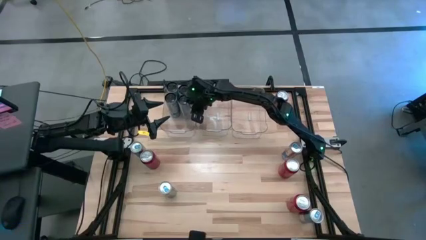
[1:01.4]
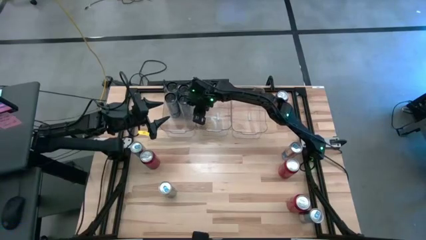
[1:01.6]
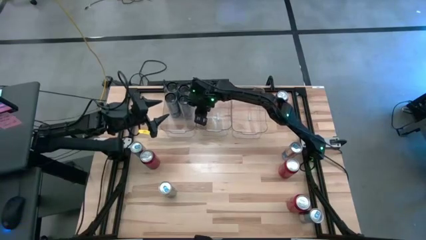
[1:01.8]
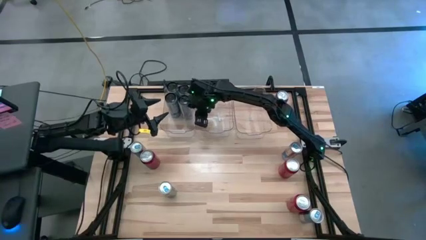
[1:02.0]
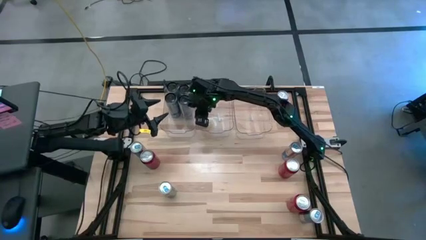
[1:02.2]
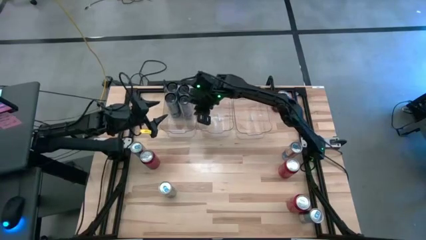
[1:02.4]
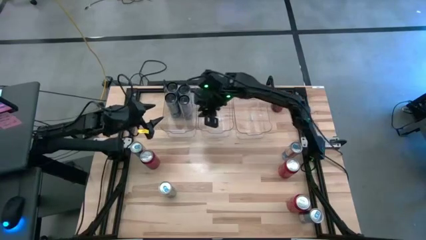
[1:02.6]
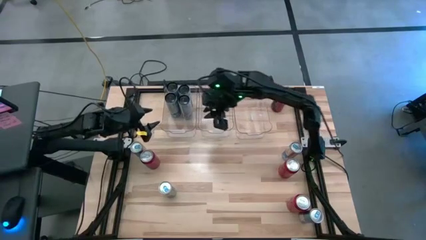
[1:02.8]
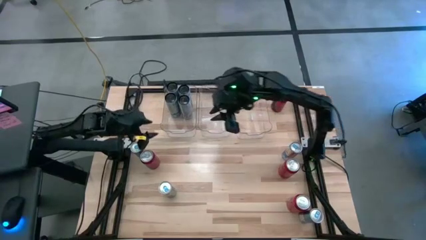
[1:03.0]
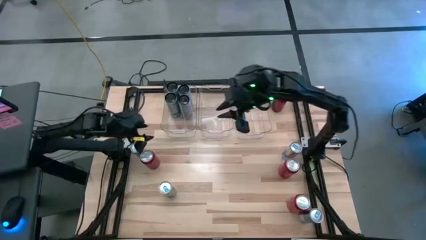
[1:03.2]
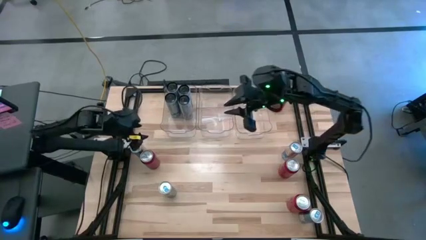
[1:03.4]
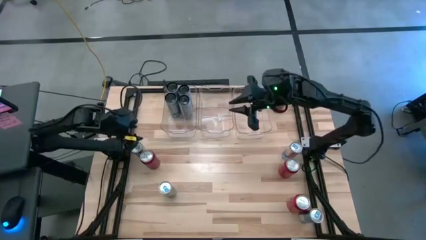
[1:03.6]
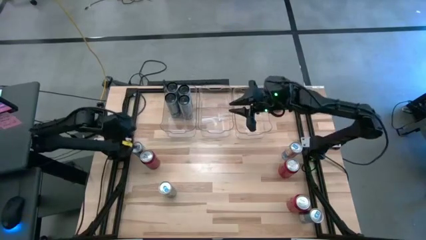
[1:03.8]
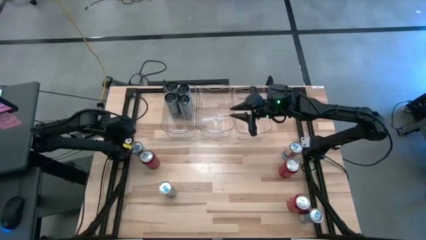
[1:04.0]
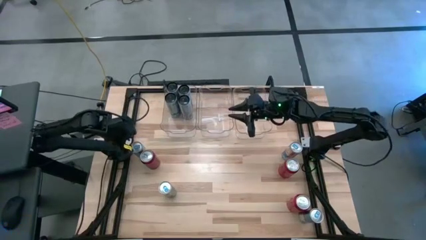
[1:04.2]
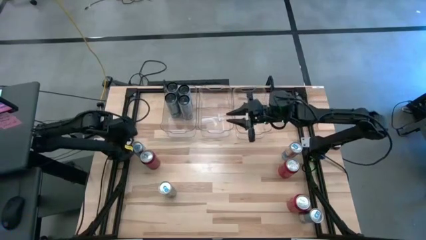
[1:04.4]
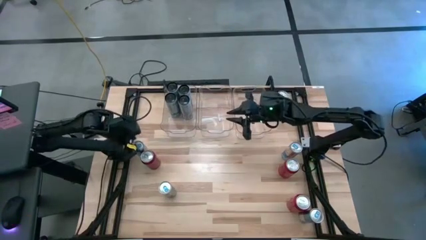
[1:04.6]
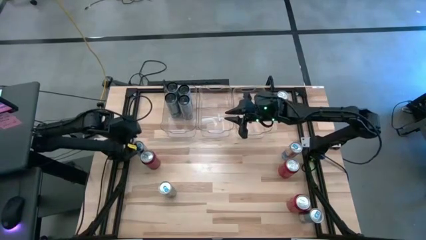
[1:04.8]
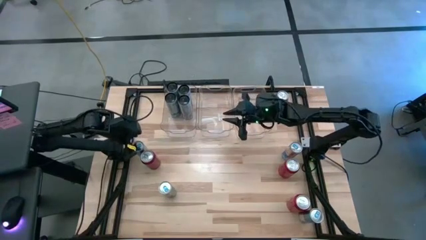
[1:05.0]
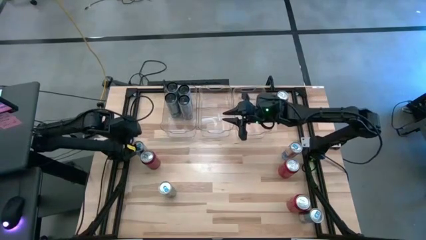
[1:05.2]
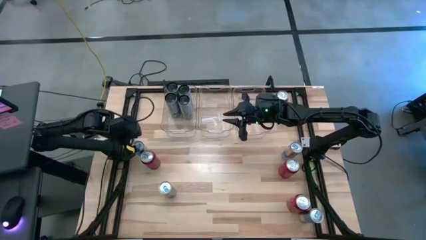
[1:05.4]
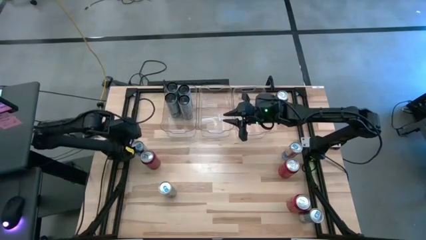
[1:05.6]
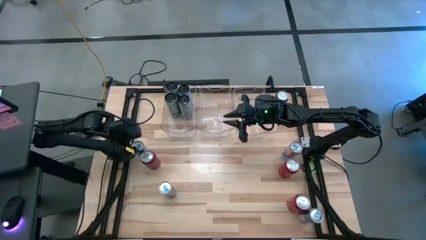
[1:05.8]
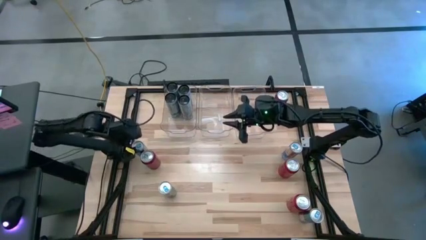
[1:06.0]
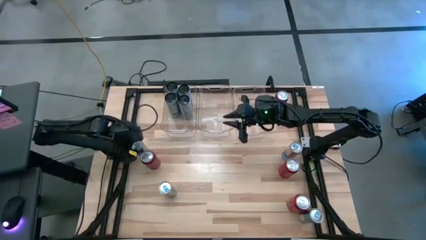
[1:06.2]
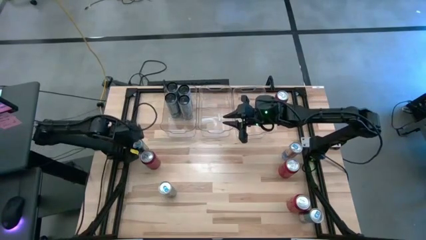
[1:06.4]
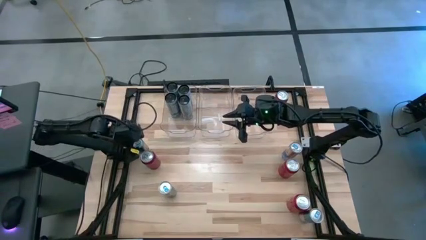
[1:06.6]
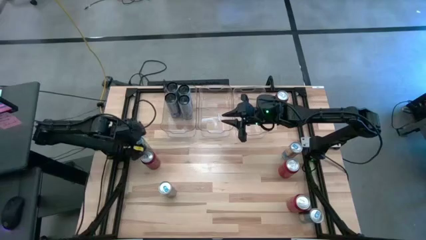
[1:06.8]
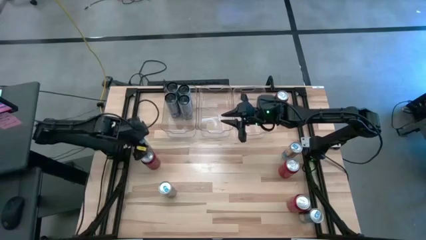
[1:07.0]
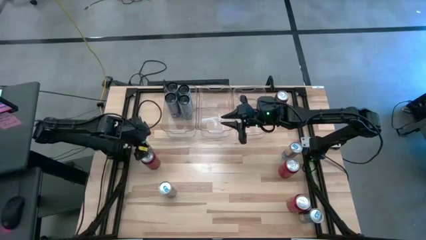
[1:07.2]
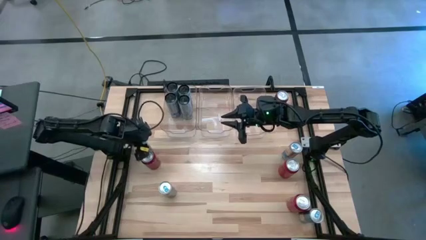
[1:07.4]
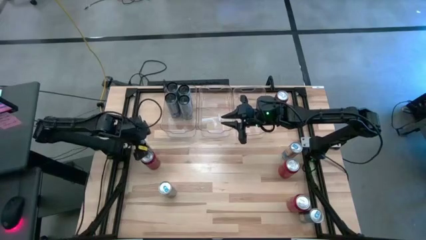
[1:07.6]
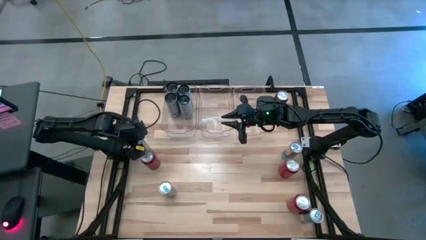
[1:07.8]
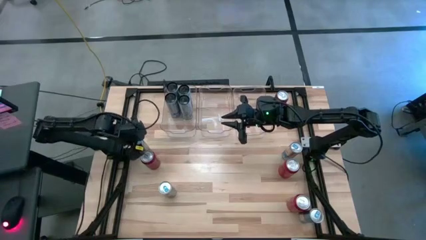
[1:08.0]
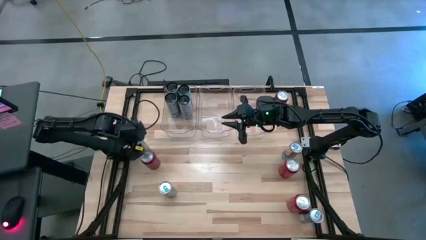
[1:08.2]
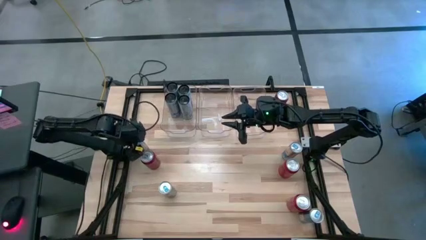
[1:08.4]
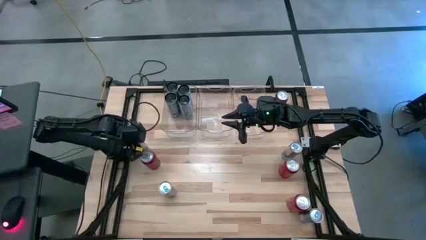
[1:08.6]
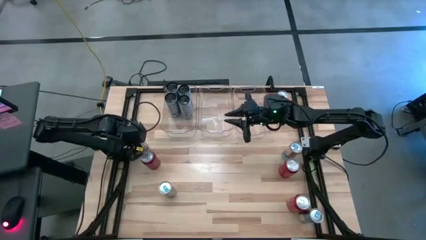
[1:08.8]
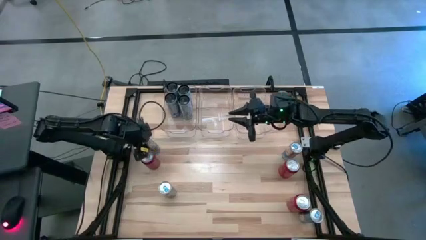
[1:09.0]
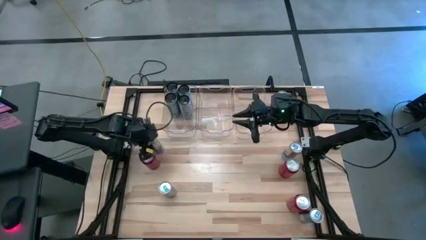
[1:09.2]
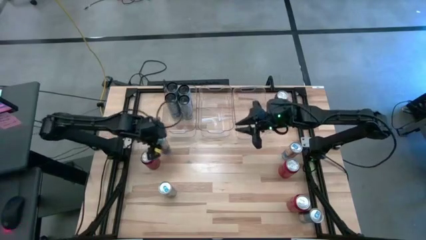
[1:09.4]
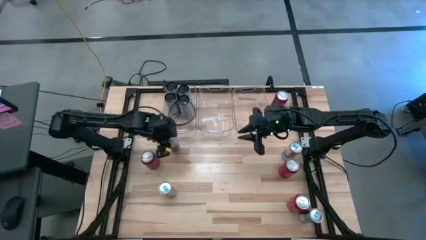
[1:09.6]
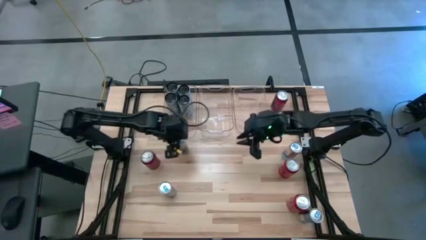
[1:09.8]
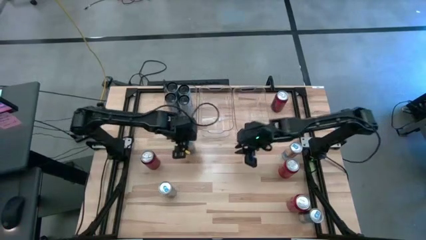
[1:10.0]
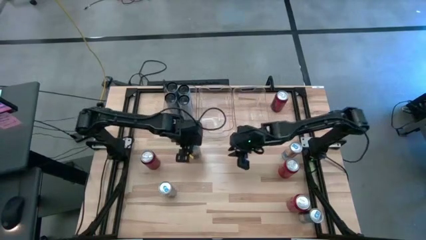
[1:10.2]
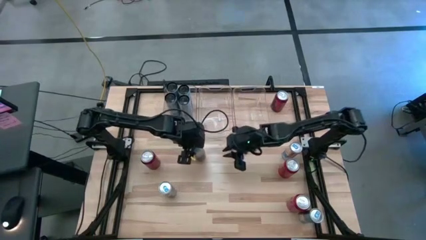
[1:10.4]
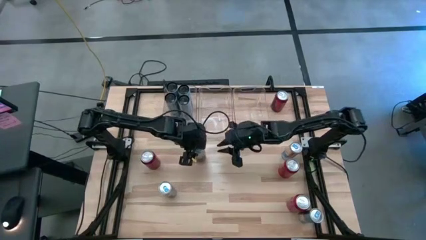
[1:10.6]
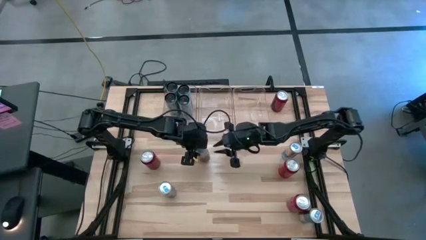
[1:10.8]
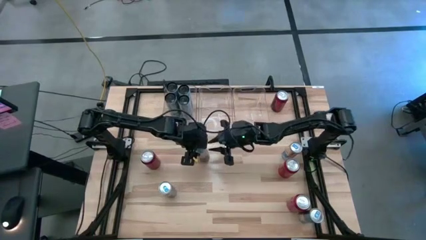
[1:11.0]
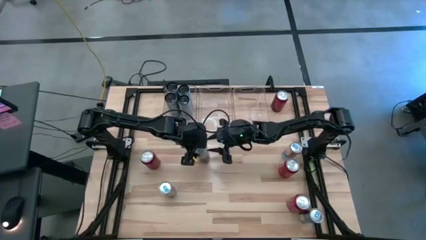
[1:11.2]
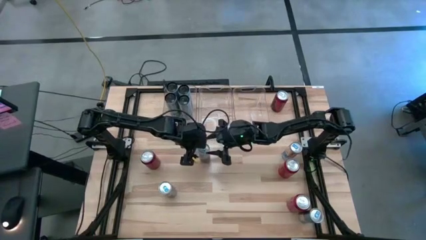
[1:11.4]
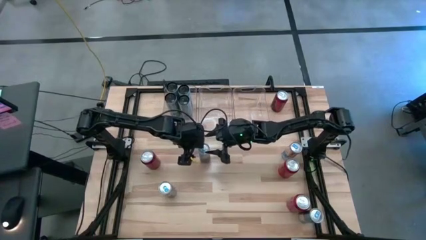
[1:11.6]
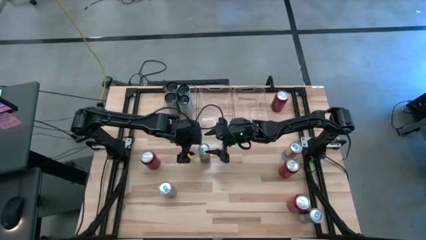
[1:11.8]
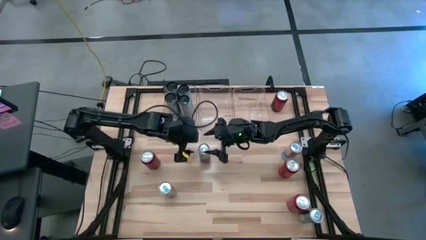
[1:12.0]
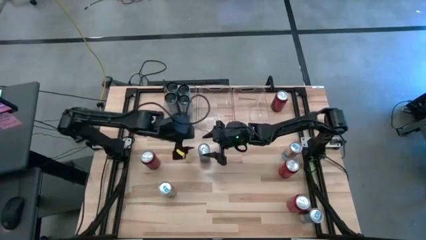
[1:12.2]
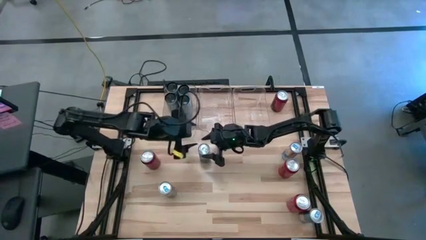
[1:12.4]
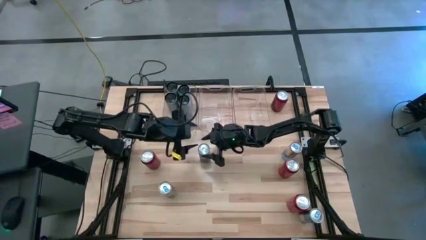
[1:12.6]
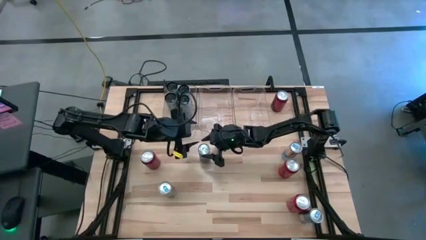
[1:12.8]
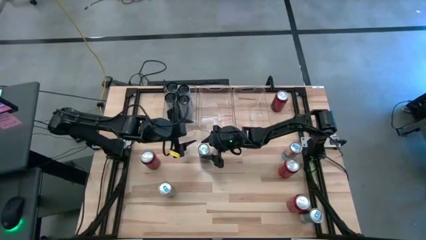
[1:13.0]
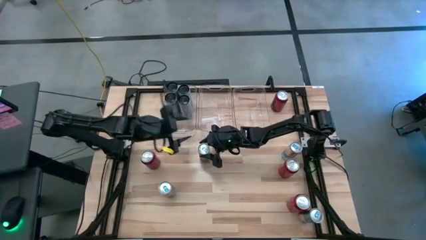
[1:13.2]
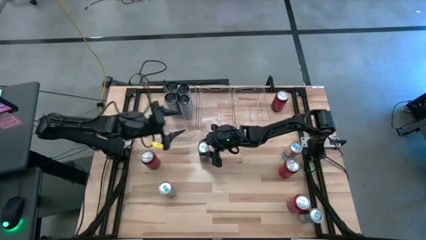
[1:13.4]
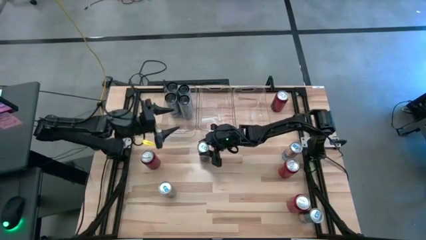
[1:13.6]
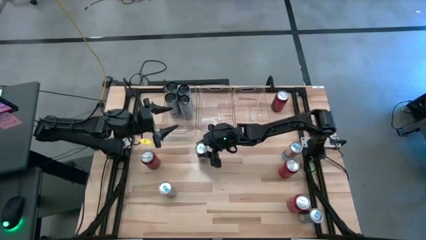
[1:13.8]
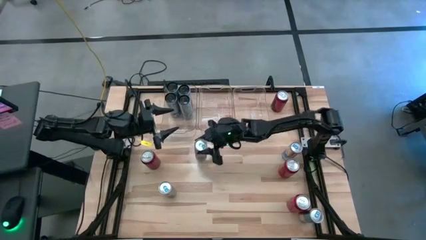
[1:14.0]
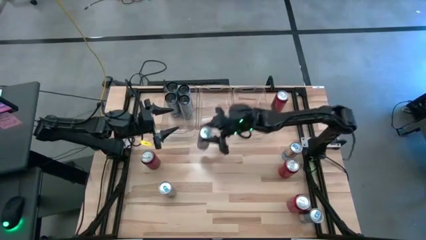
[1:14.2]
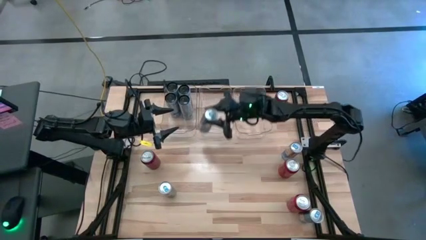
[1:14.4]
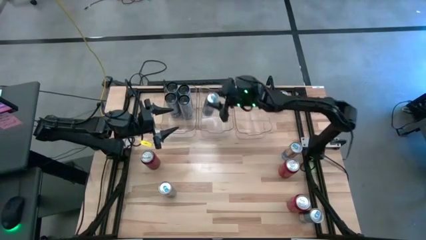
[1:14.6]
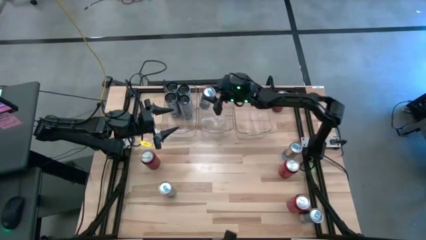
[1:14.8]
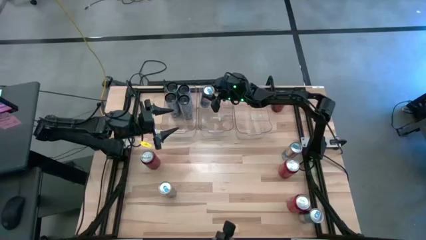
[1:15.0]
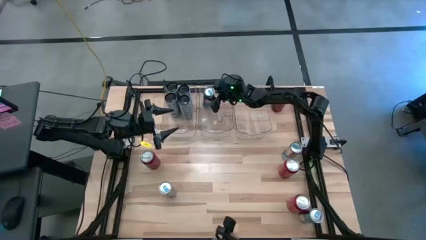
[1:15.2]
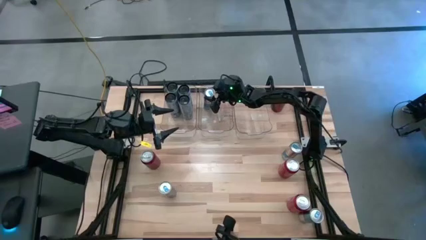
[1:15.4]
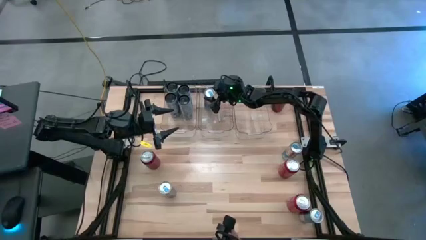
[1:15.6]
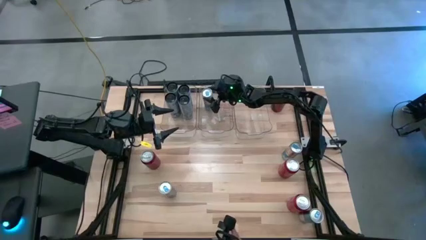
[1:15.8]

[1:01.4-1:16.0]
Task: Sort soda cans
Put the blue soda can into the middle transparent bin
